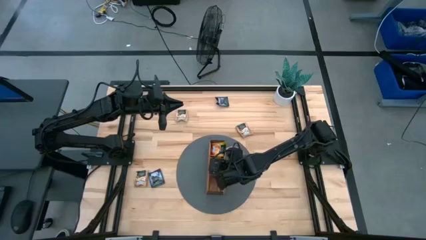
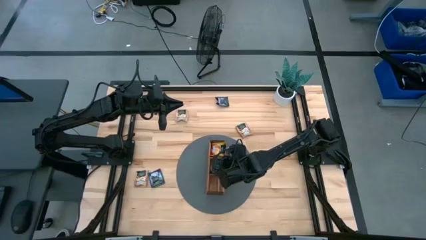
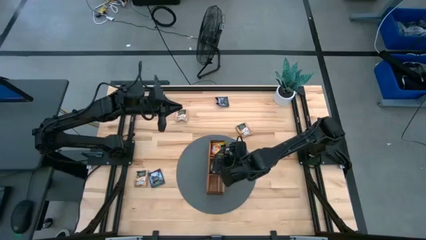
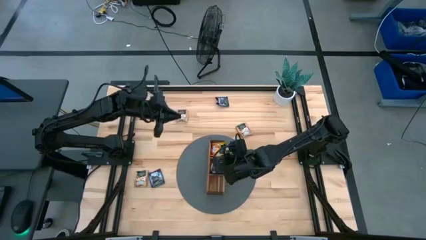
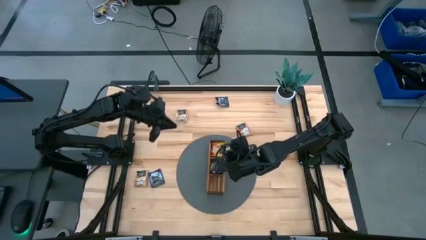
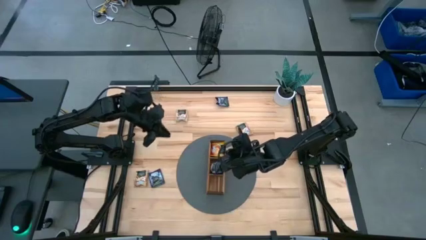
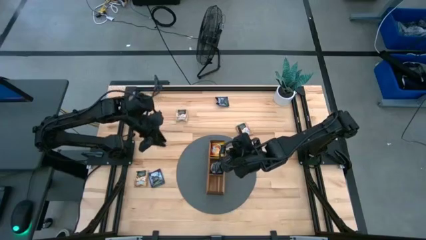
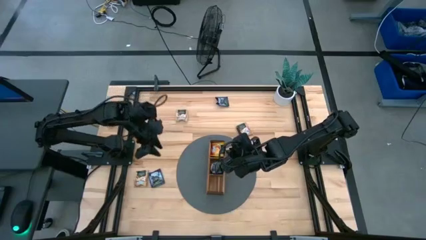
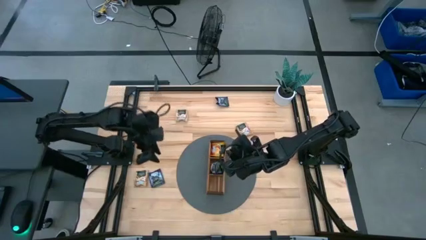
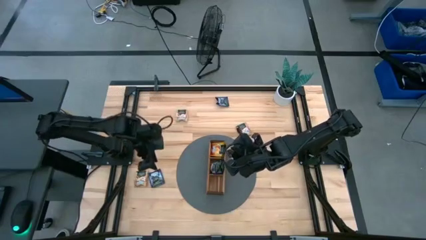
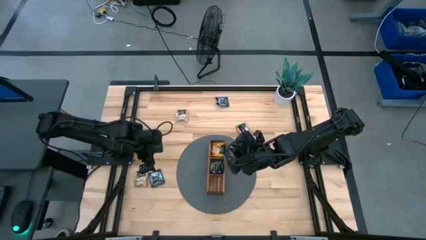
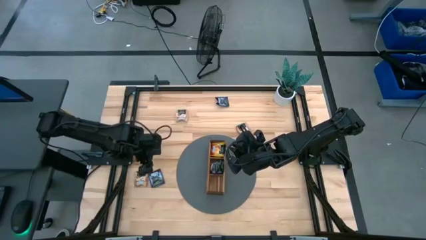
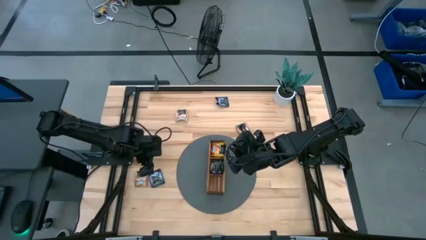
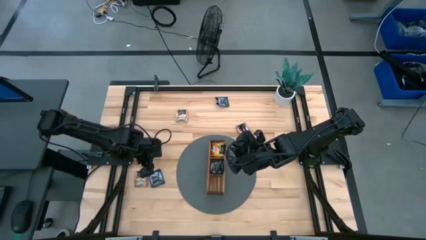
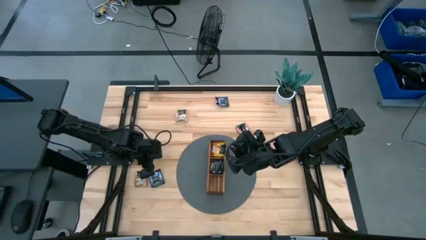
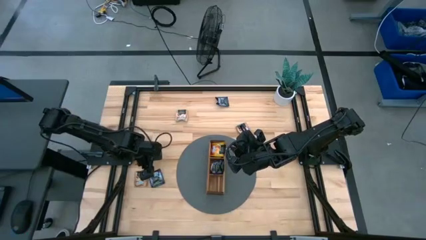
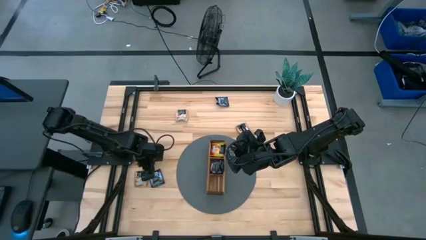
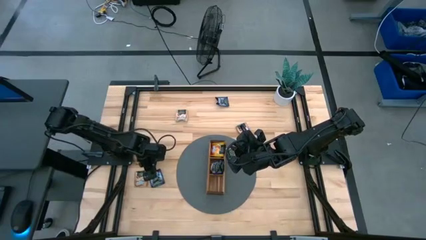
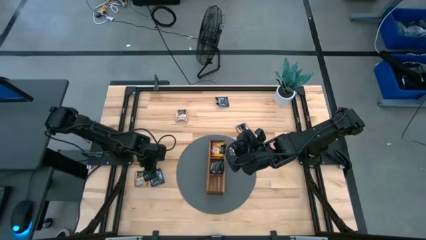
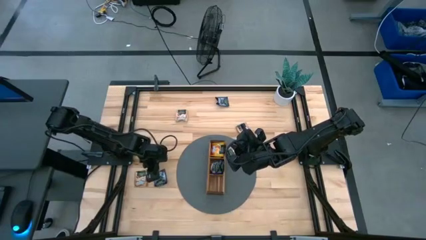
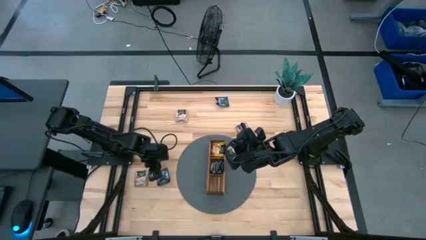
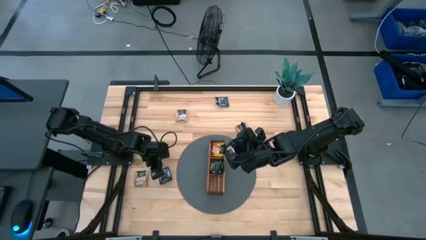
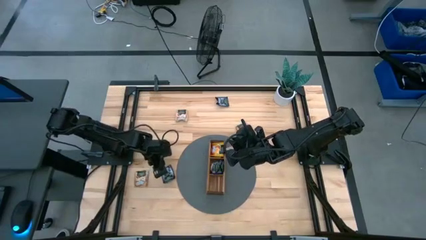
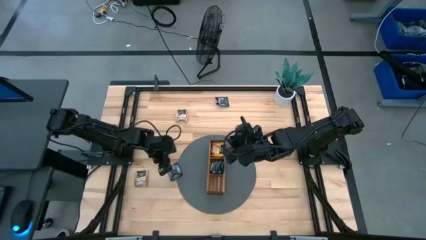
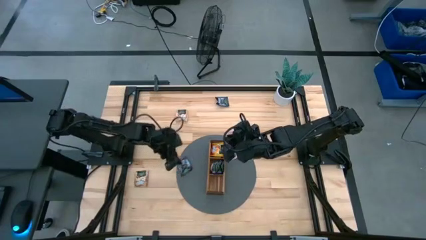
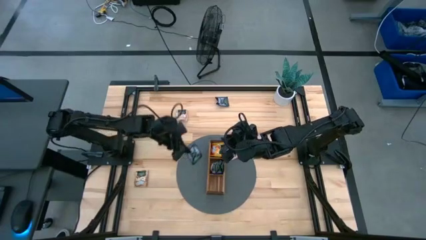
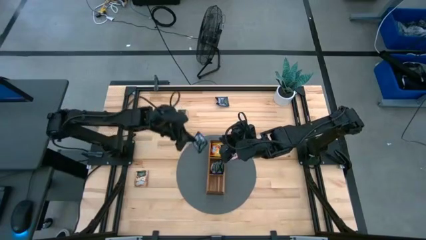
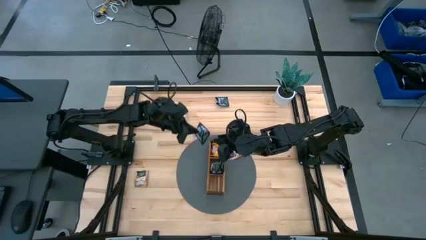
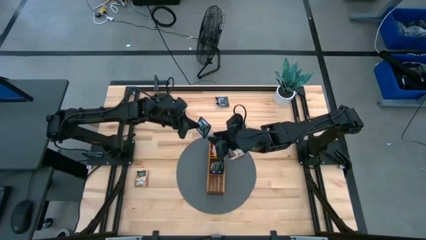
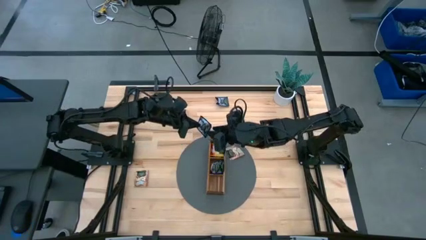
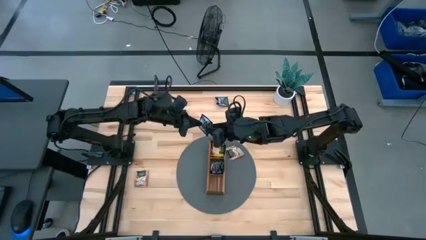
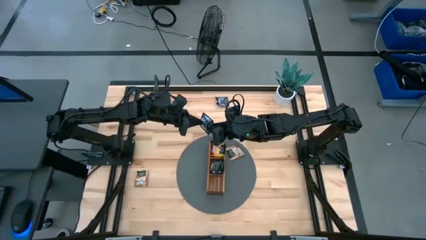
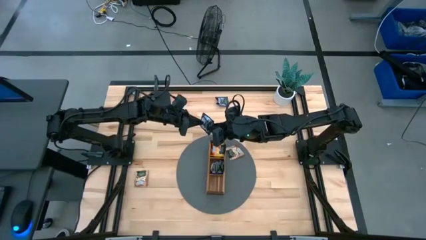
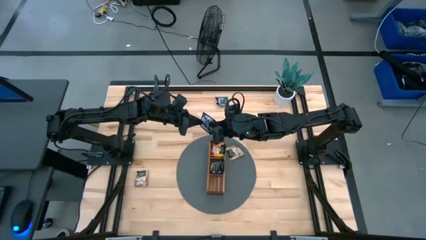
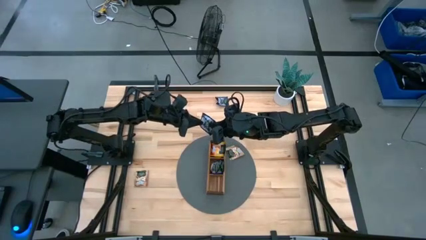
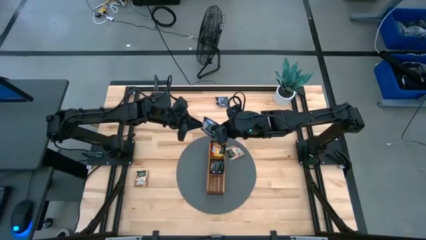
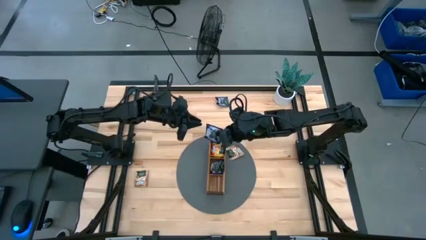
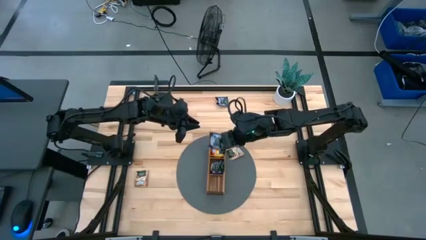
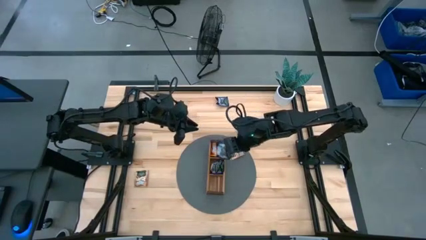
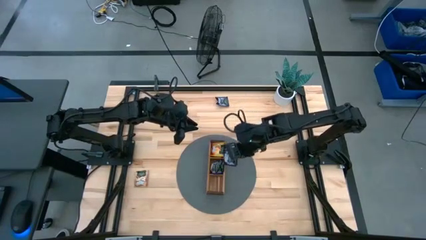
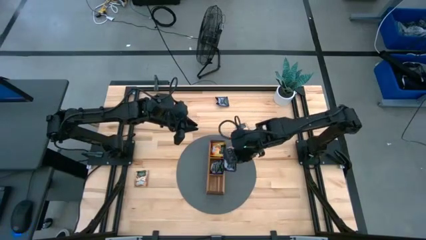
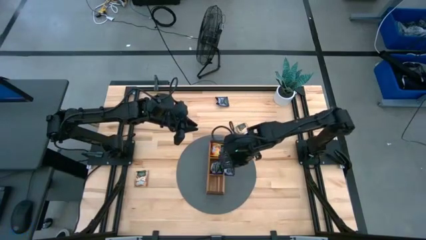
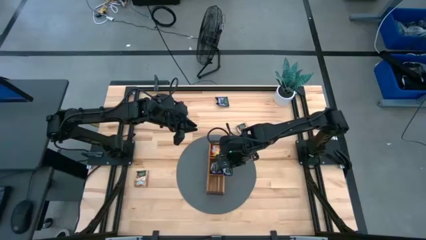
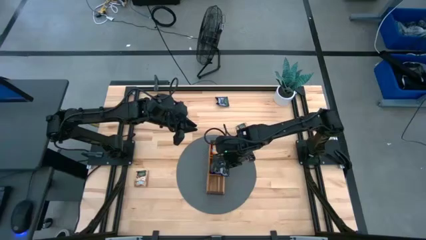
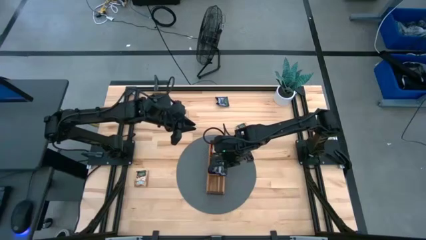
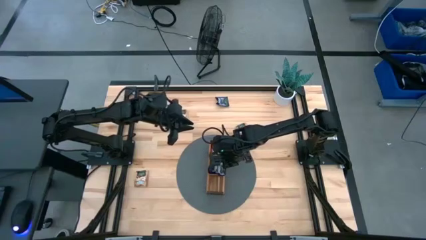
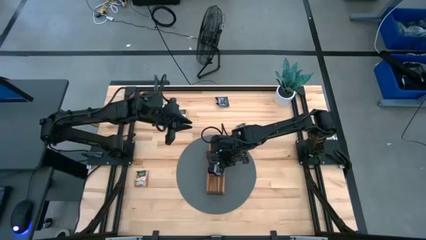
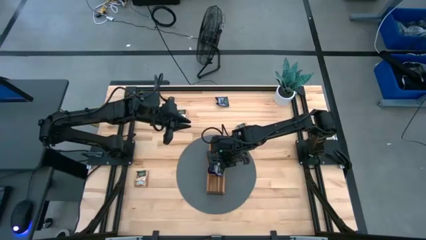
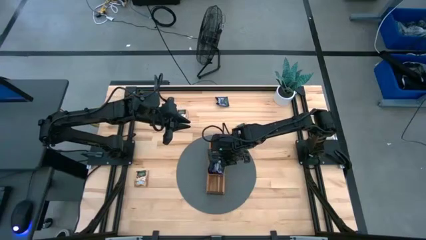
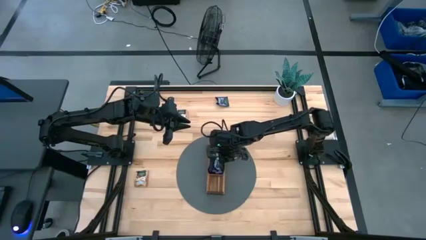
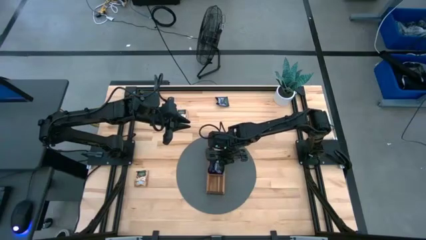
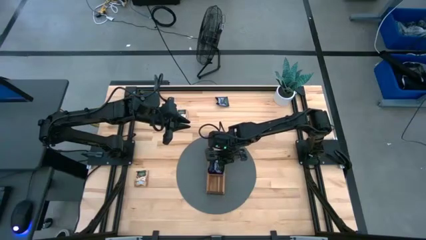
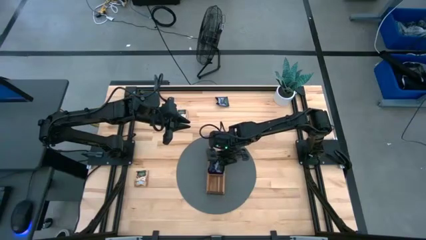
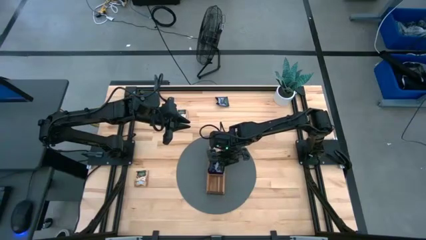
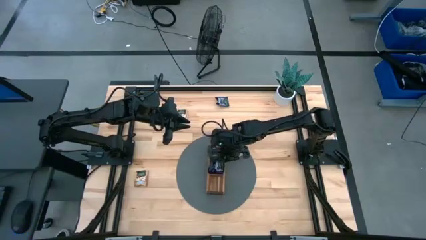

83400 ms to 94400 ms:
Task: Pick & Place Tea
Put the purple tea bag into the middle section of the wooden organizer

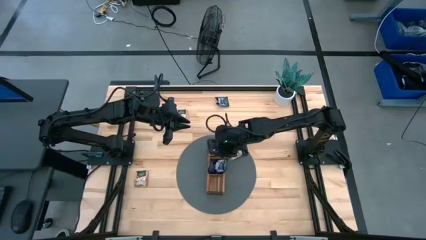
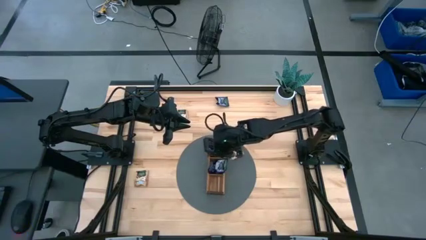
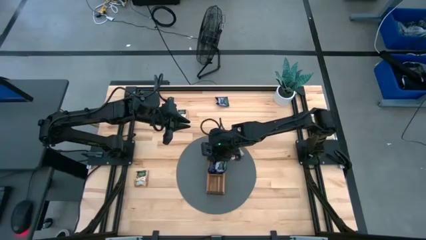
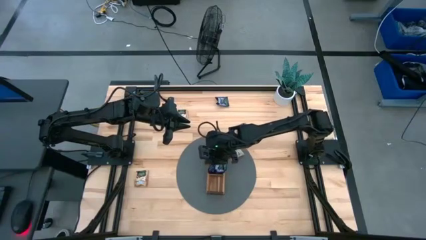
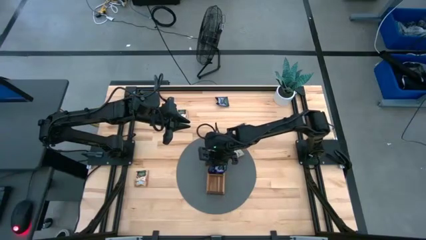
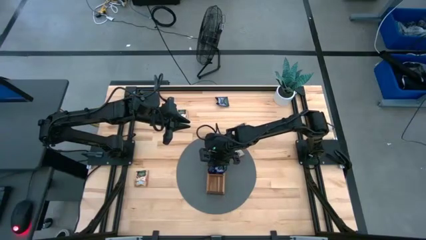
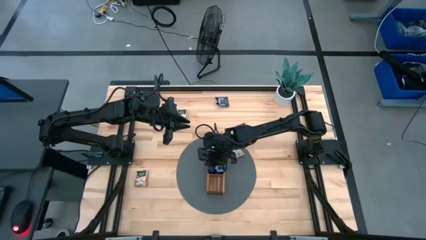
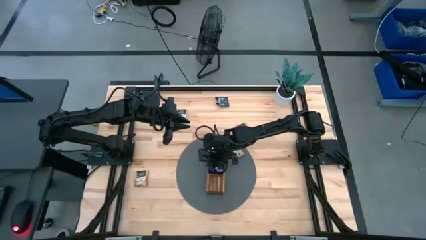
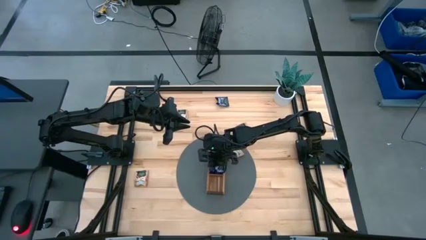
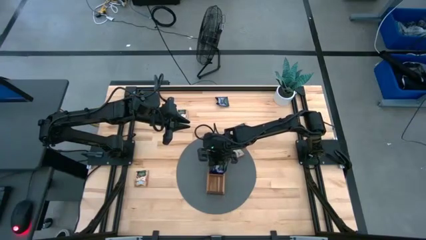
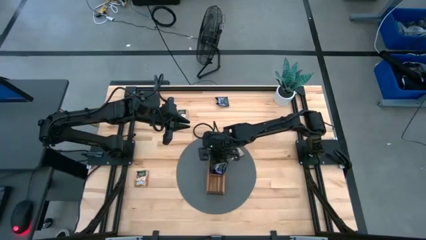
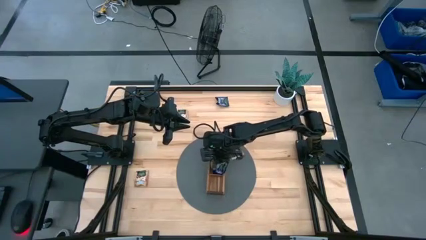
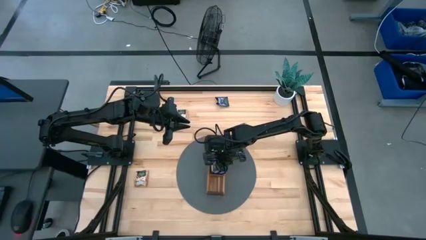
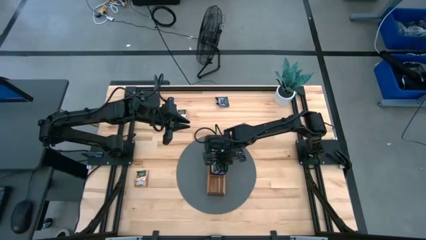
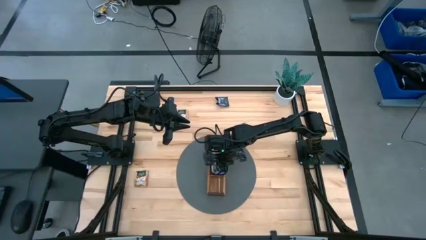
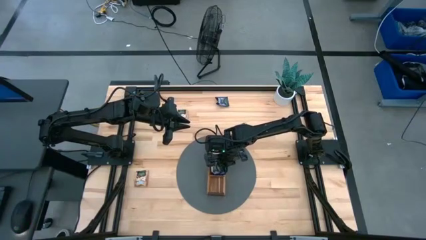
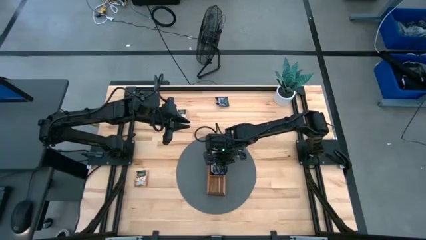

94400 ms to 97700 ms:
Adjust the purple tea bag in the wooden organizer

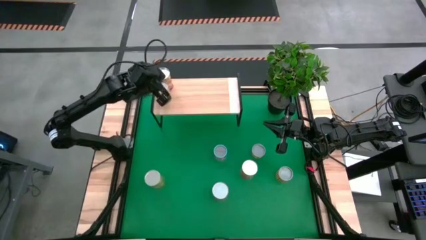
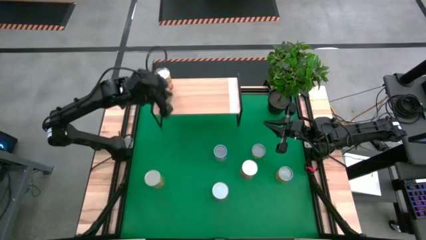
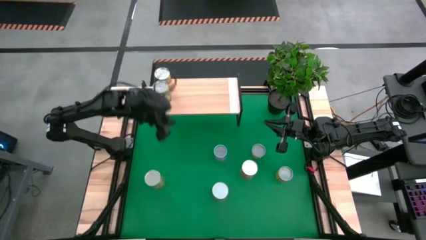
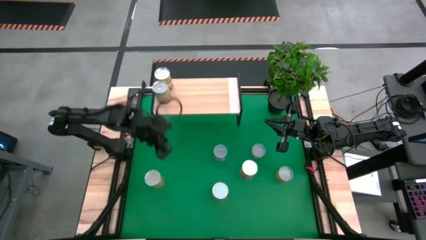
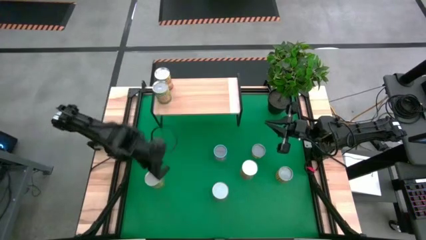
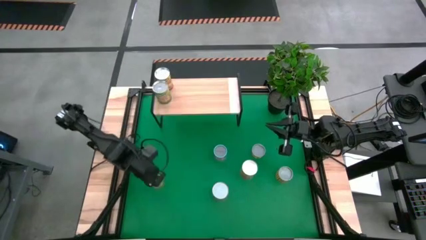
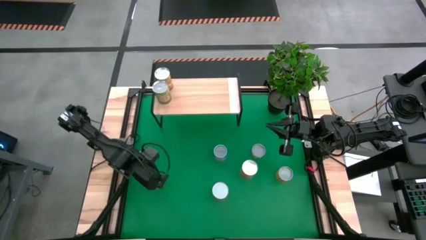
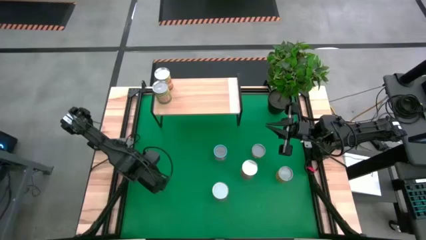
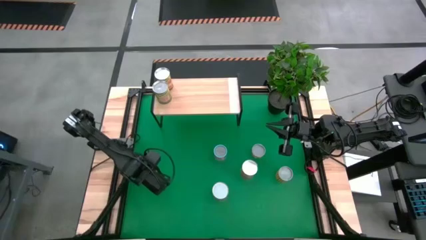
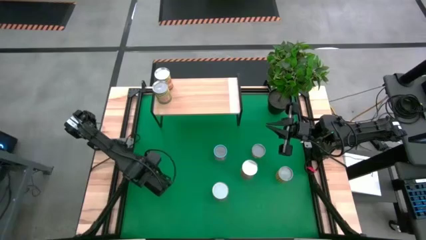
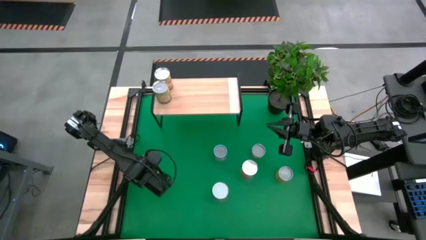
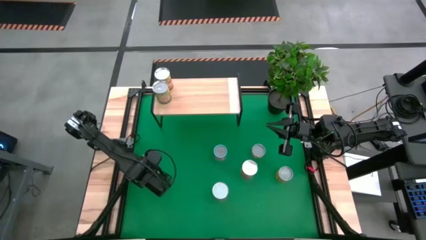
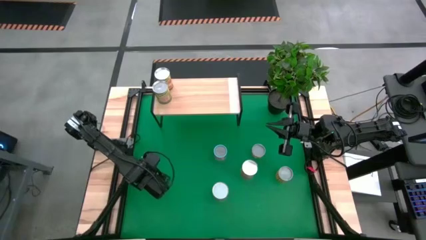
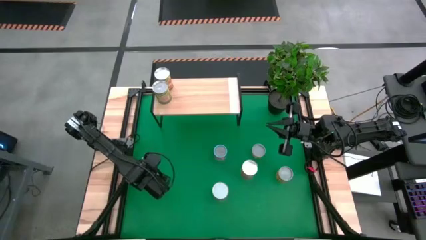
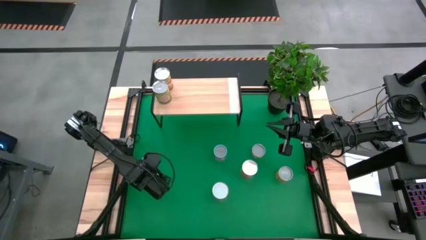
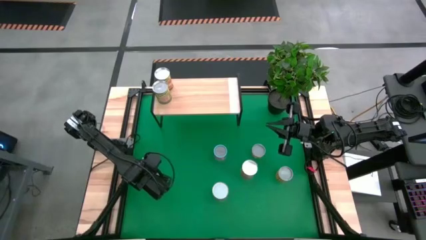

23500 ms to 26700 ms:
Task: Pick and place cans onto a shelf
Put the pear can on the shelf
